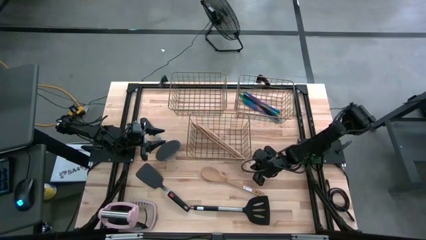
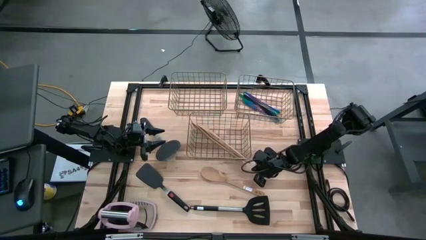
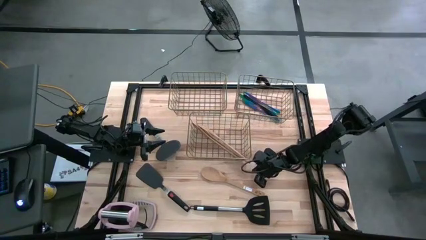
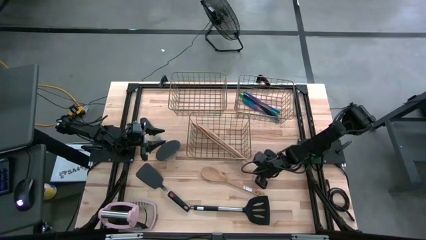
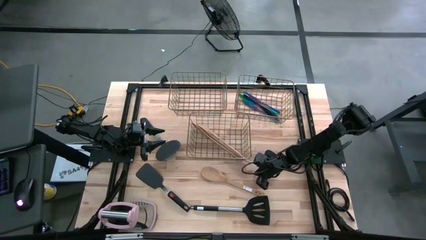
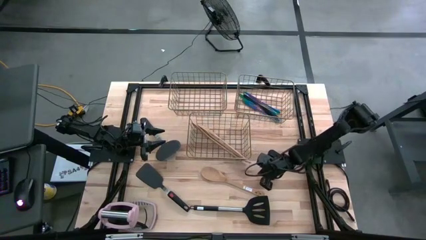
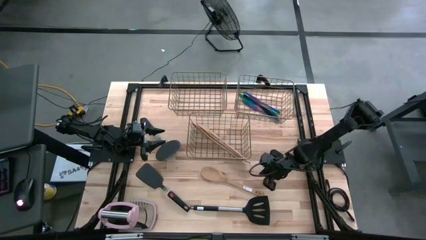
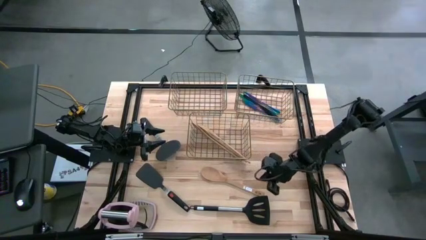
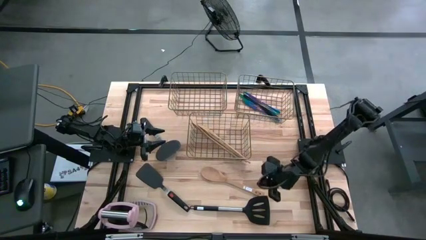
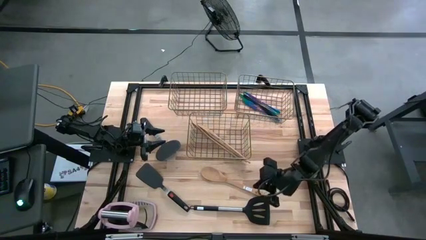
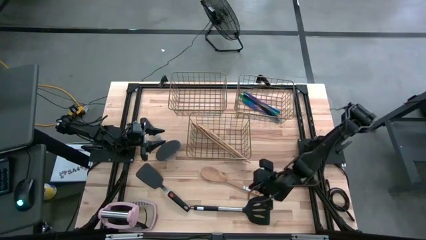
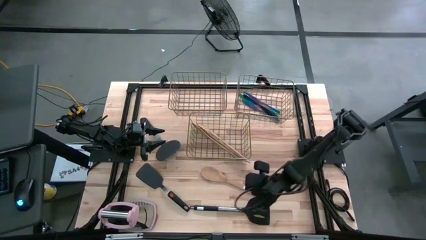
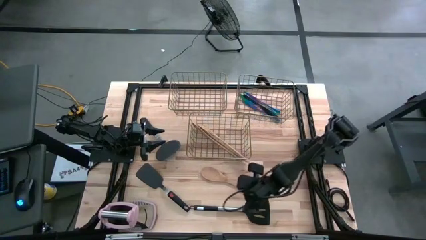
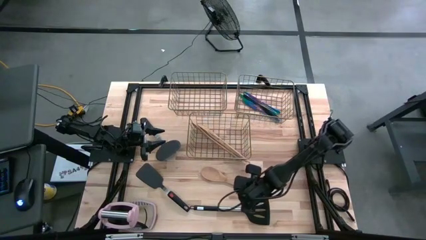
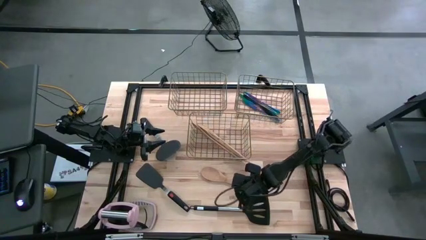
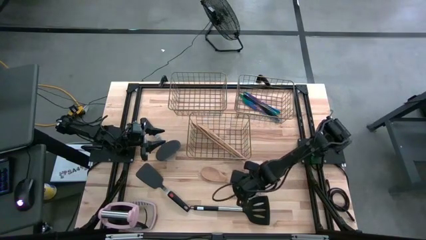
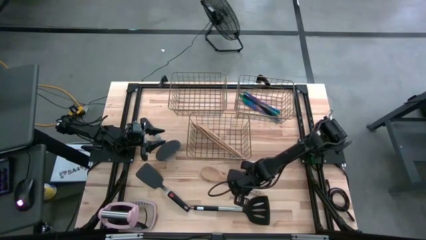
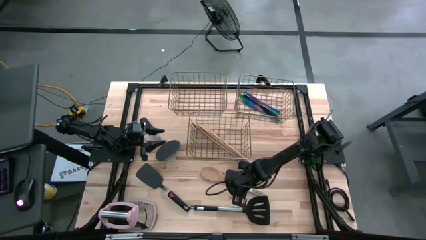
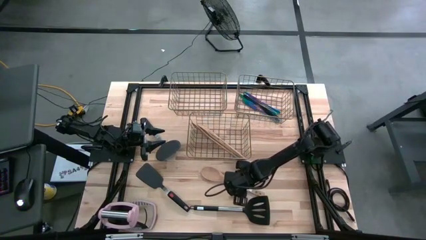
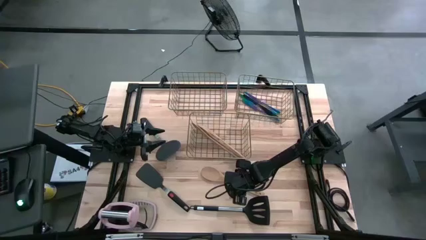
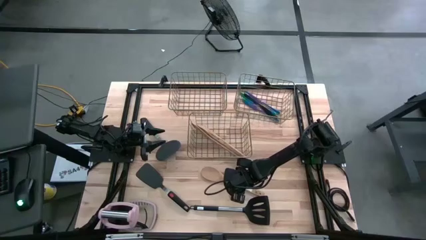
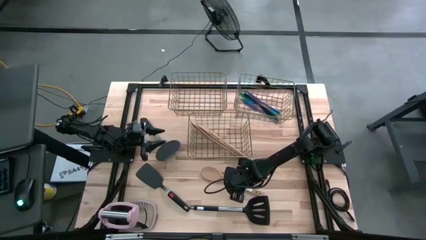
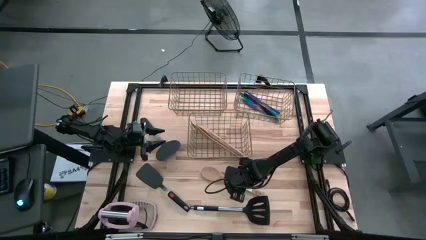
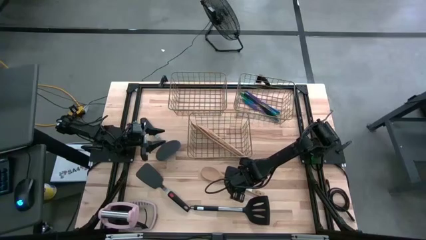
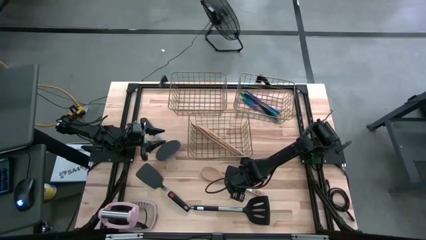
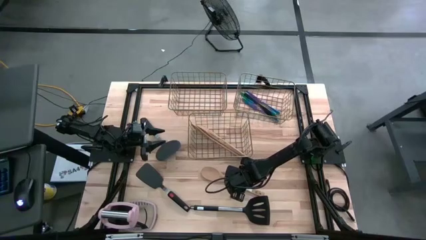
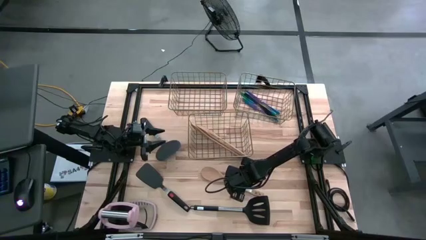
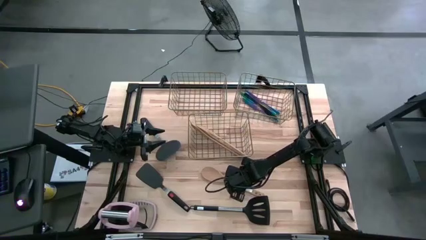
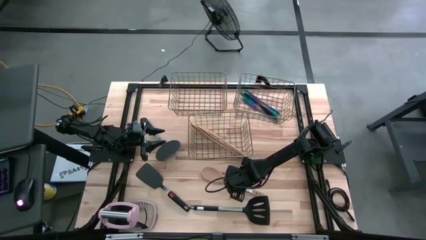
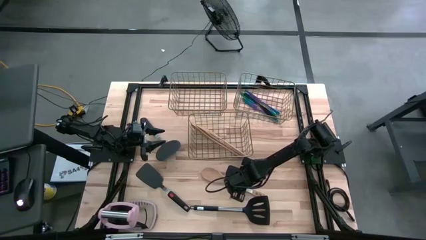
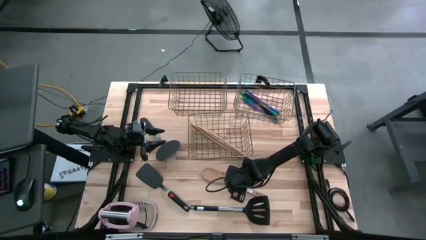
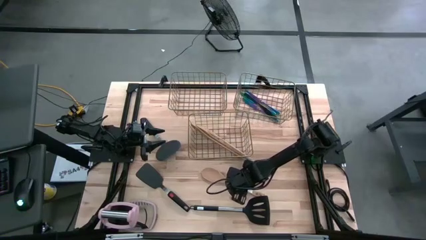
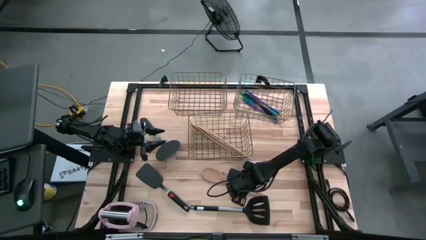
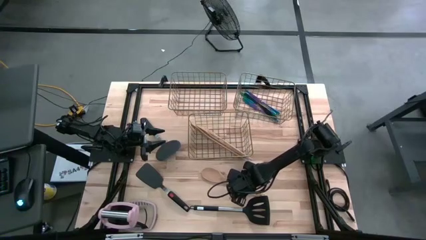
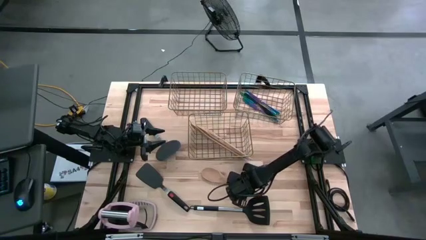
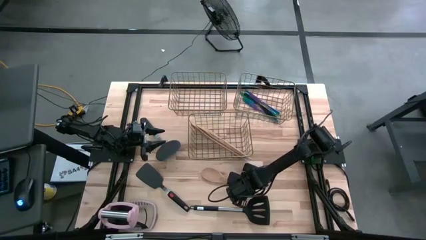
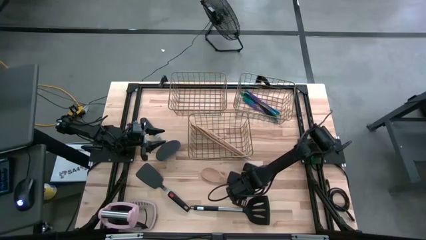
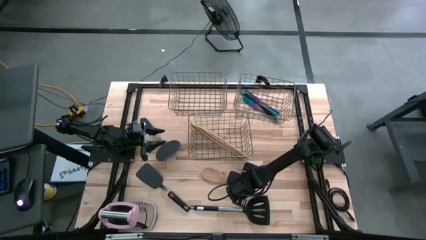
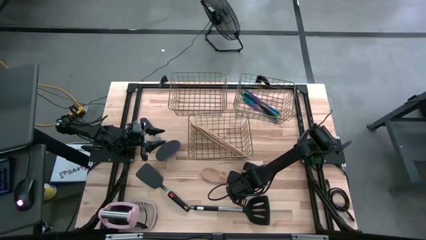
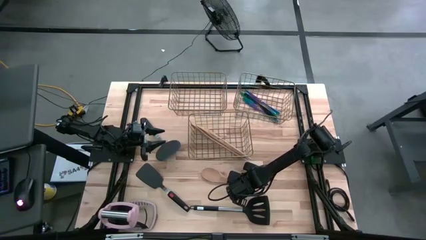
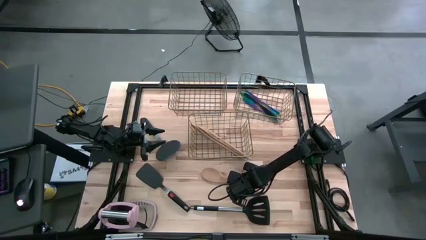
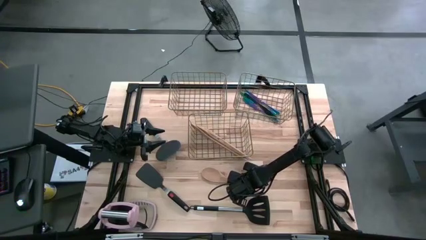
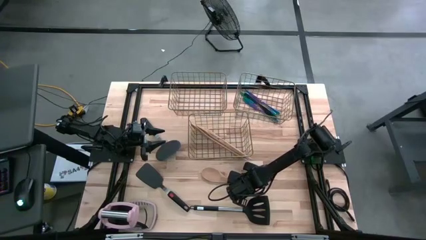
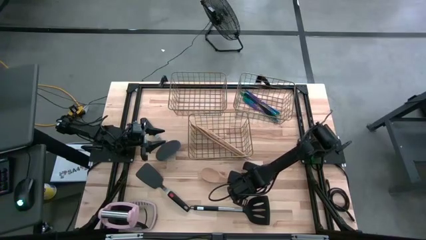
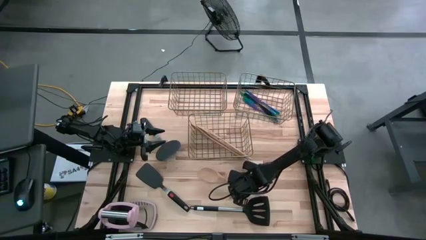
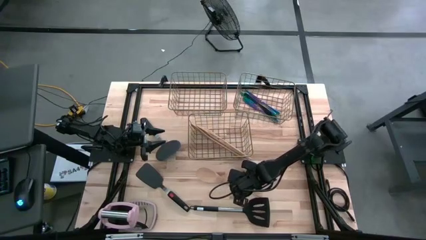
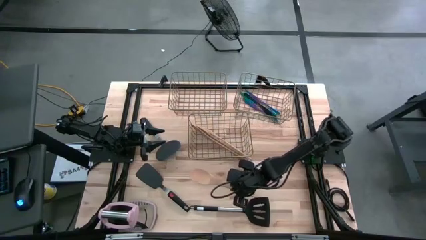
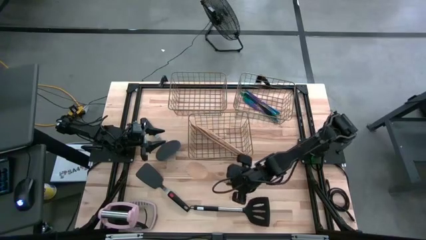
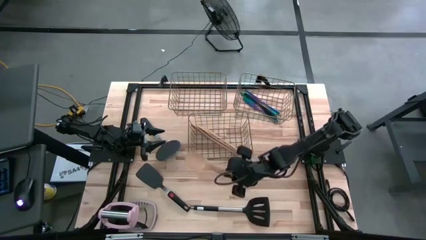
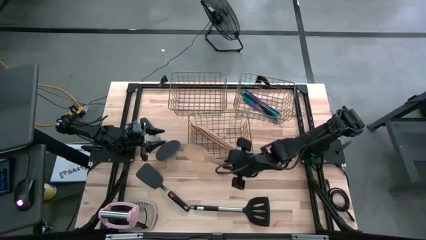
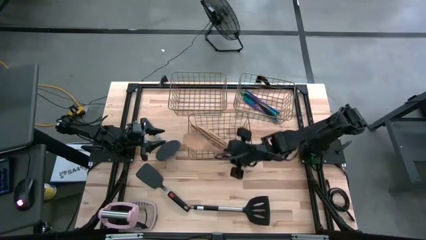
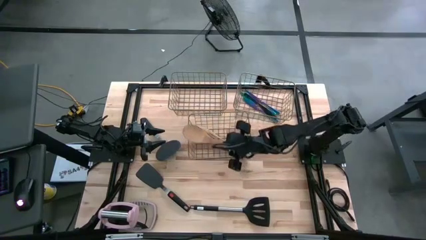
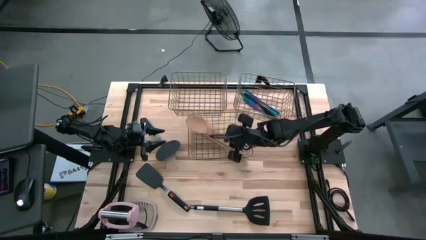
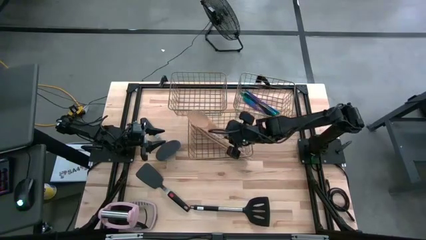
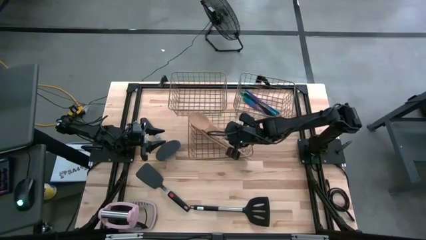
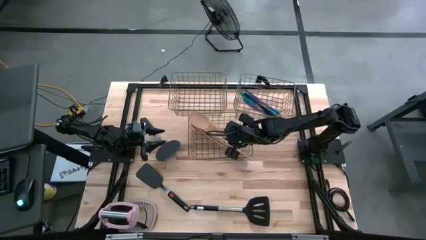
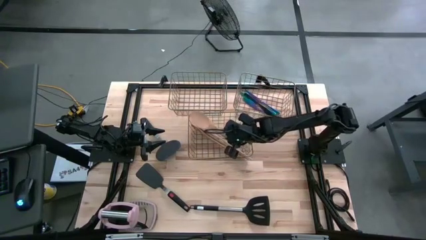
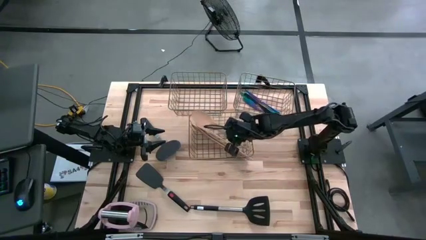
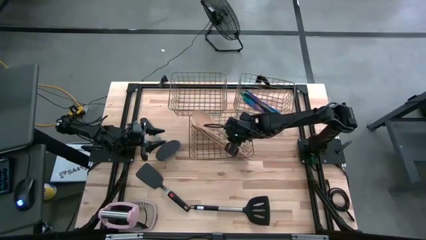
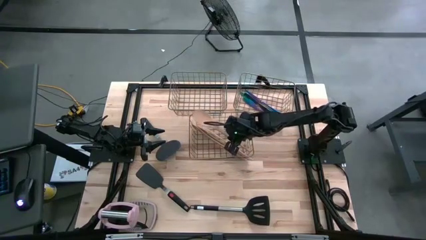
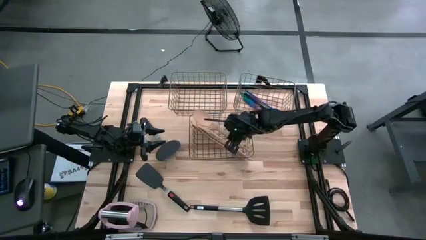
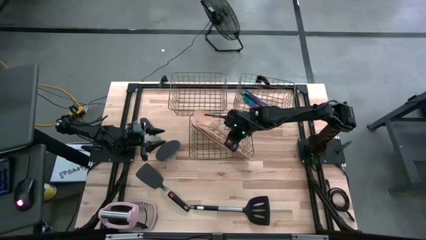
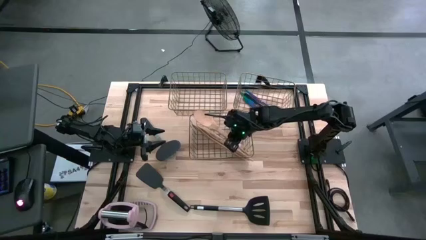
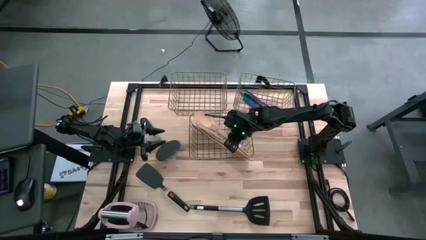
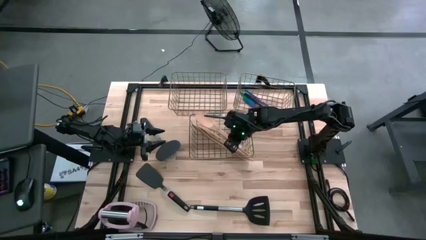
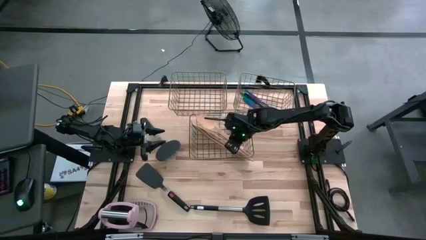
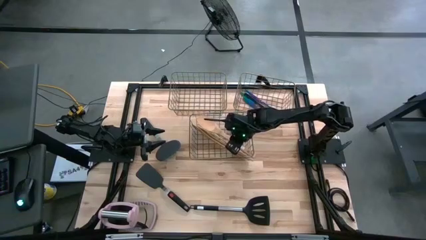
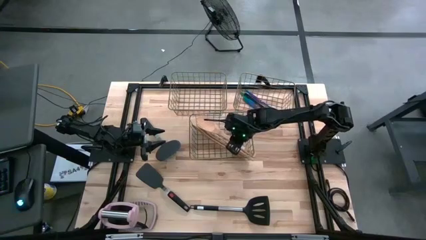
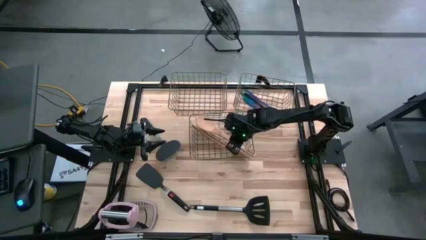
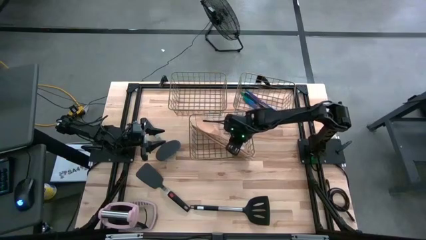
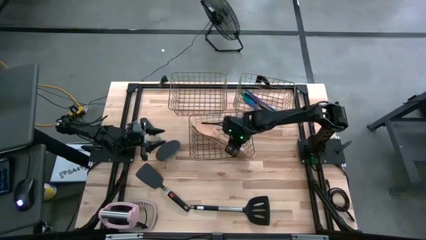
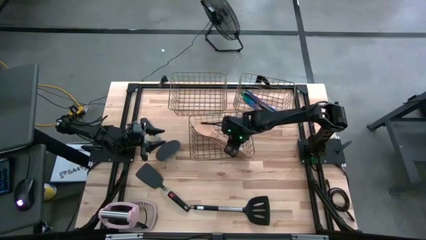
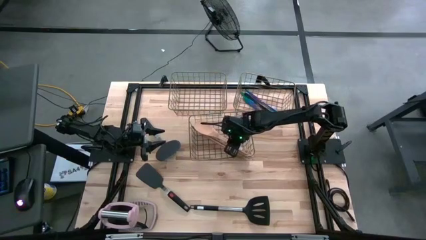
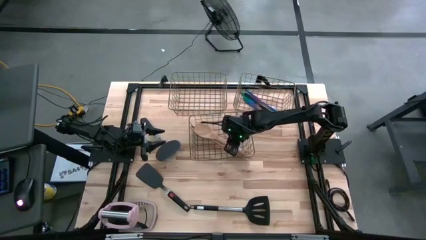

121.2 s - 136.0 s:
Task: Pick & Place Kitchen Items
Put the wooden spatula into the bottom wire basket
